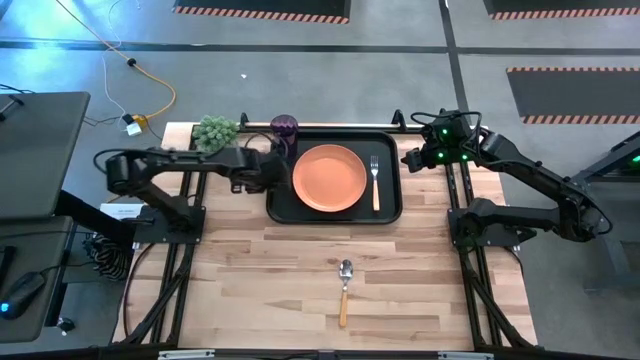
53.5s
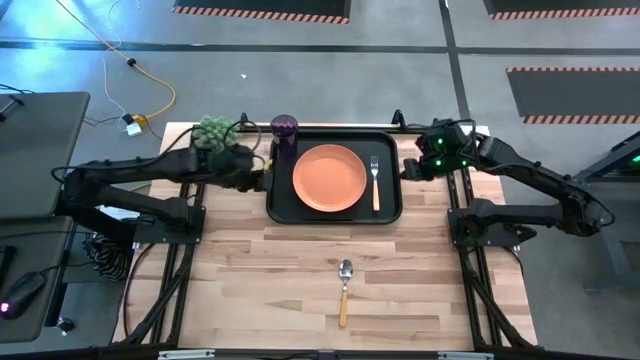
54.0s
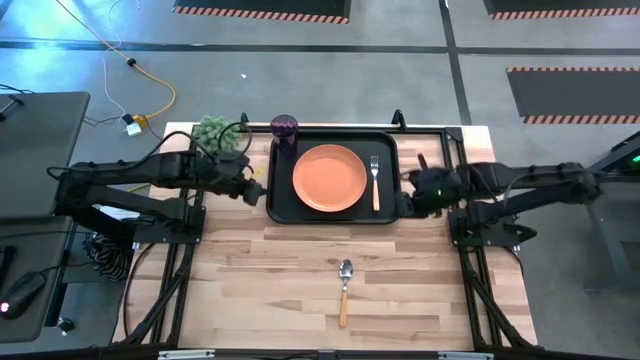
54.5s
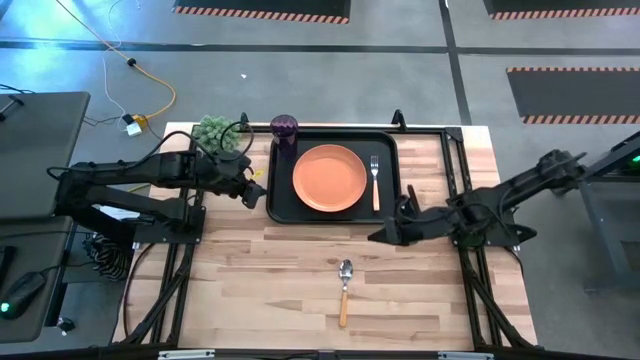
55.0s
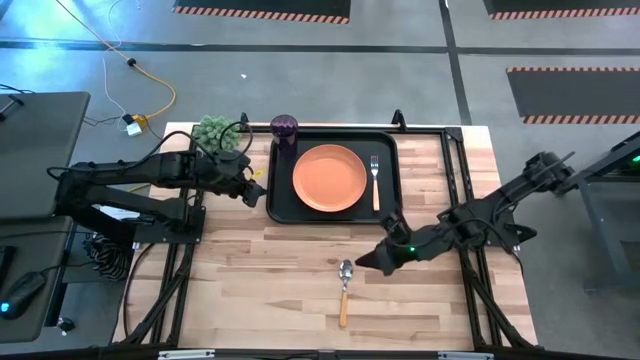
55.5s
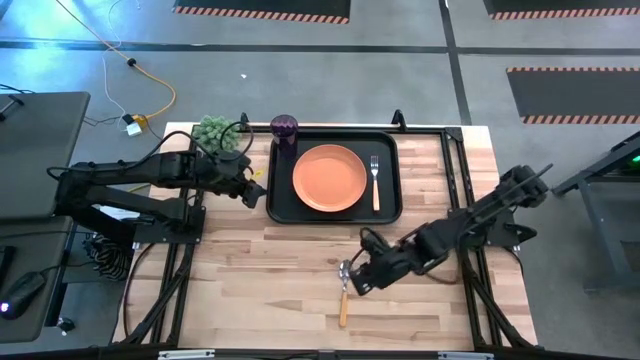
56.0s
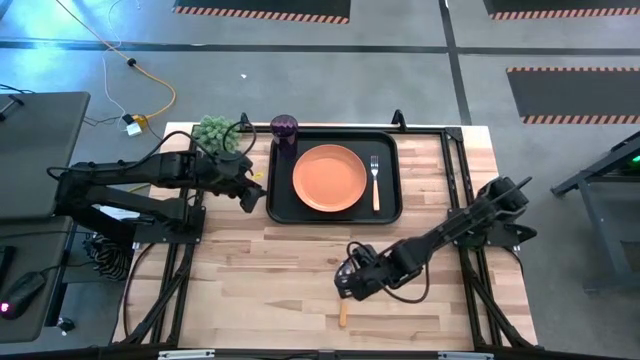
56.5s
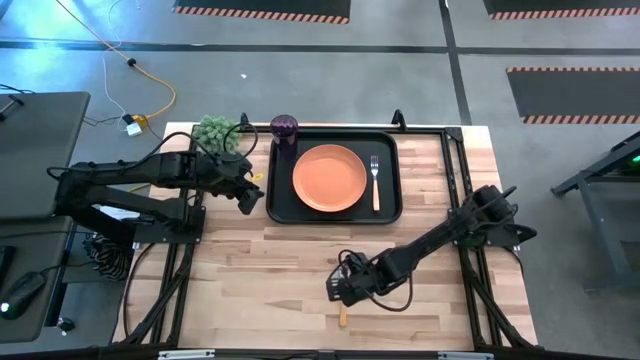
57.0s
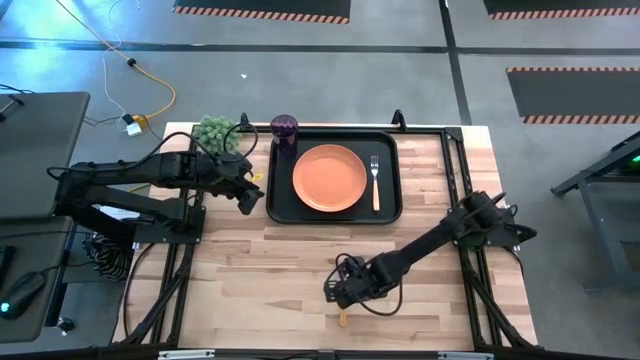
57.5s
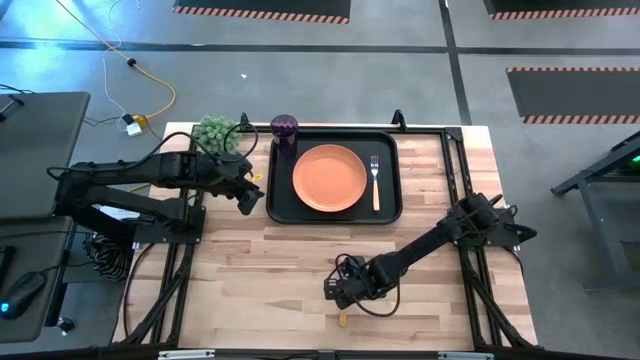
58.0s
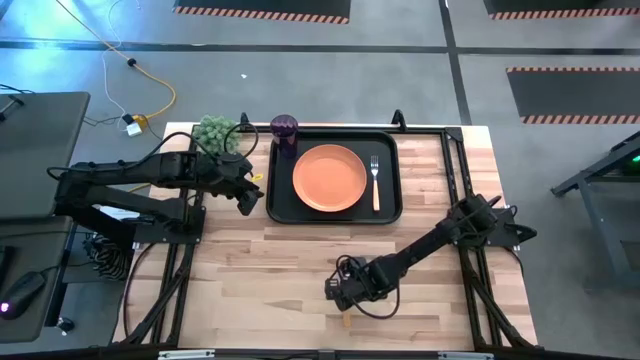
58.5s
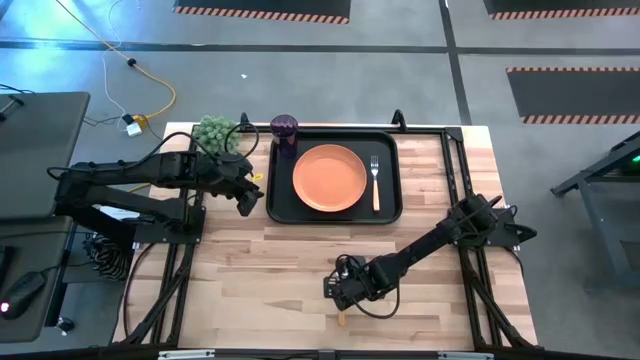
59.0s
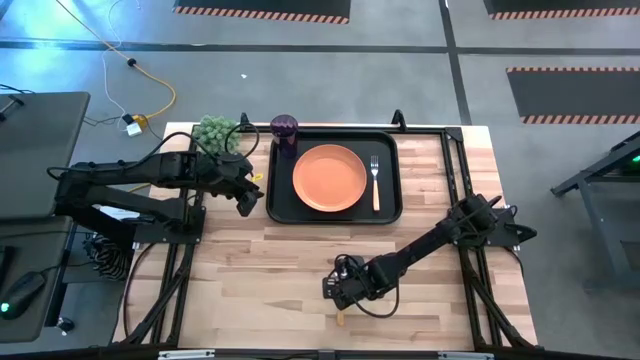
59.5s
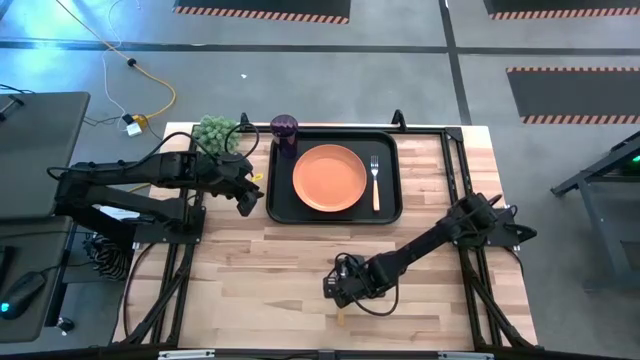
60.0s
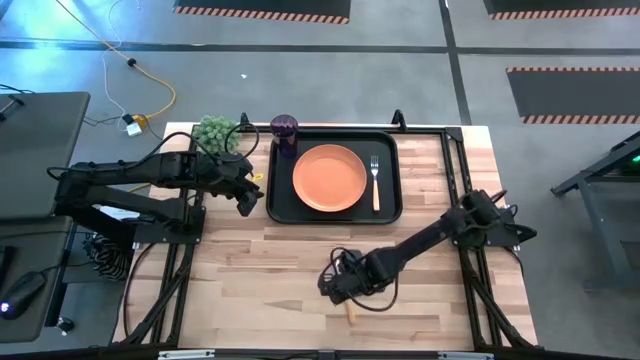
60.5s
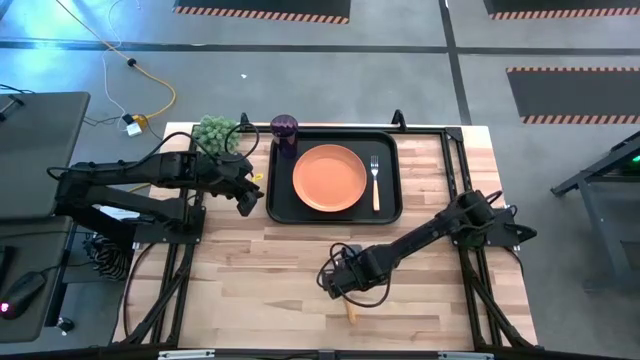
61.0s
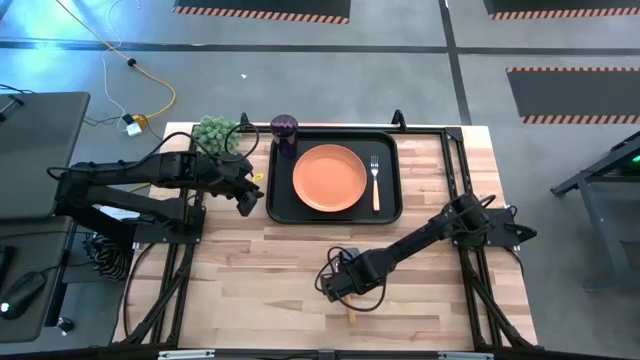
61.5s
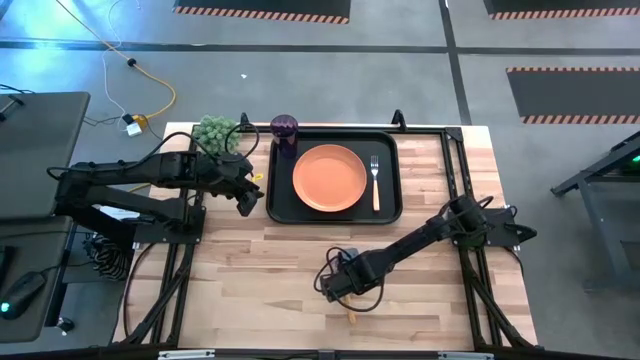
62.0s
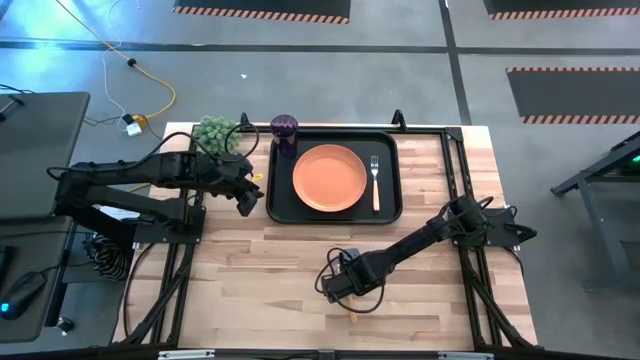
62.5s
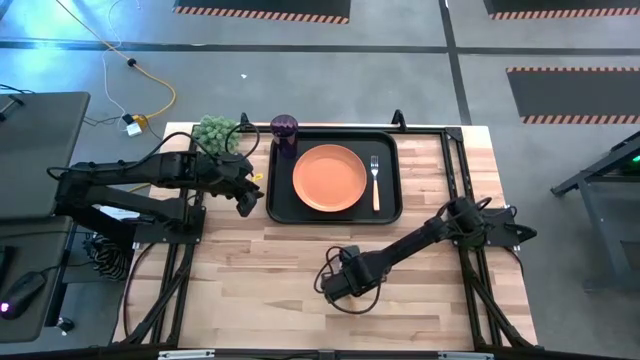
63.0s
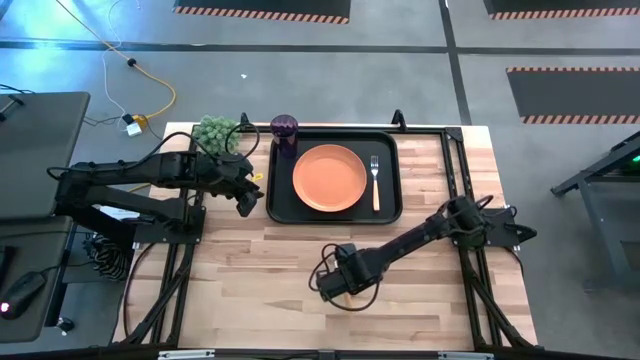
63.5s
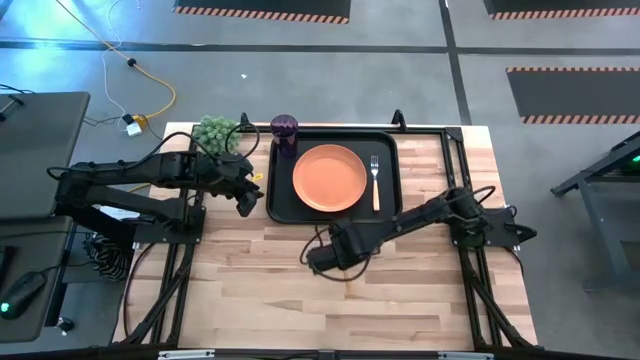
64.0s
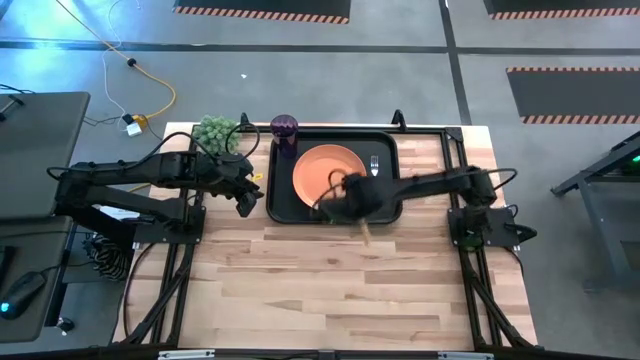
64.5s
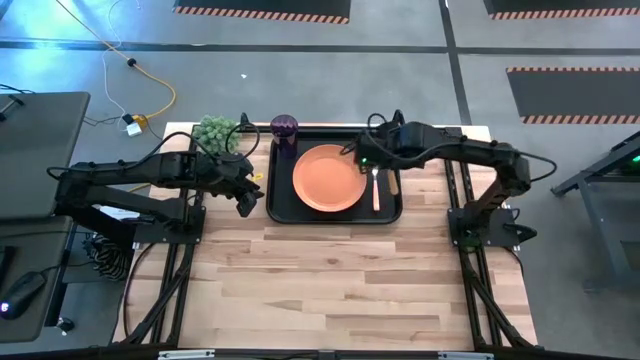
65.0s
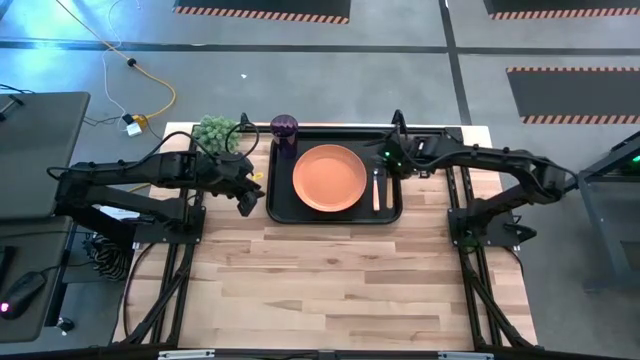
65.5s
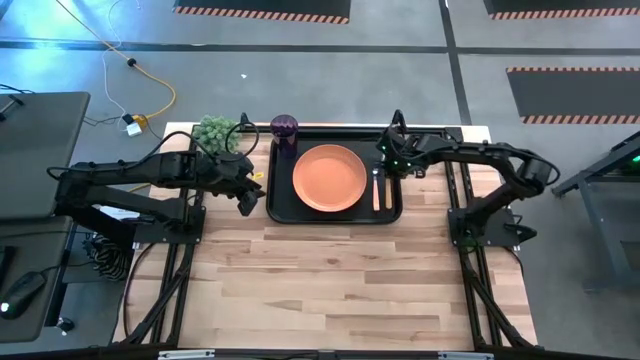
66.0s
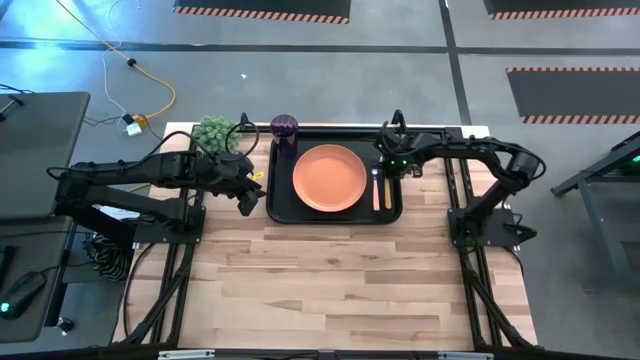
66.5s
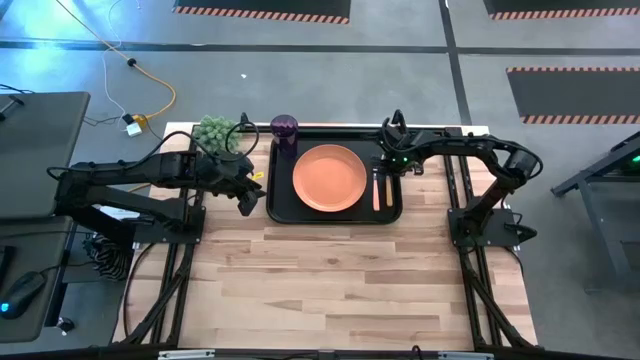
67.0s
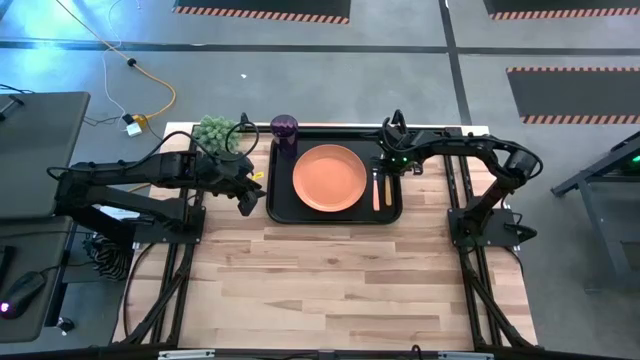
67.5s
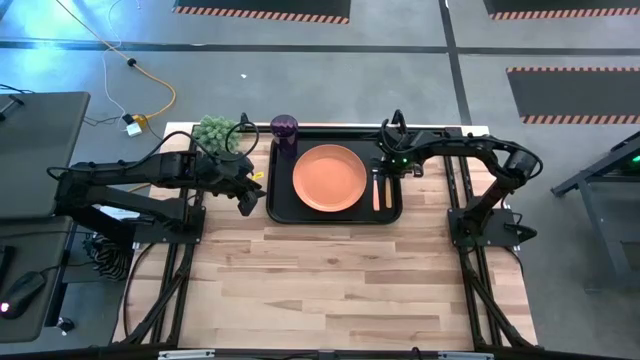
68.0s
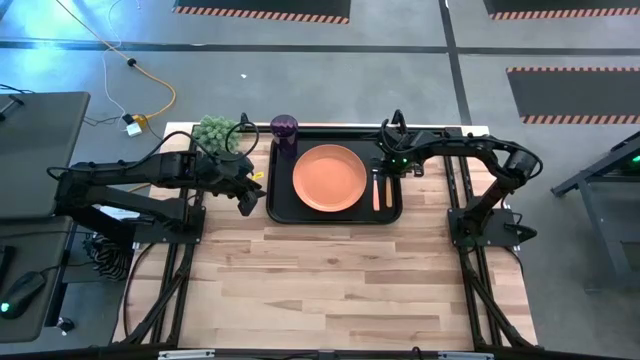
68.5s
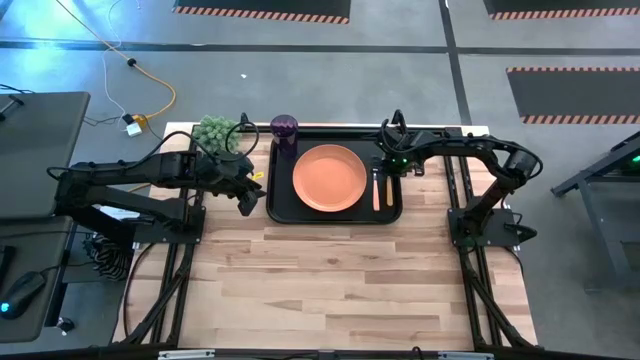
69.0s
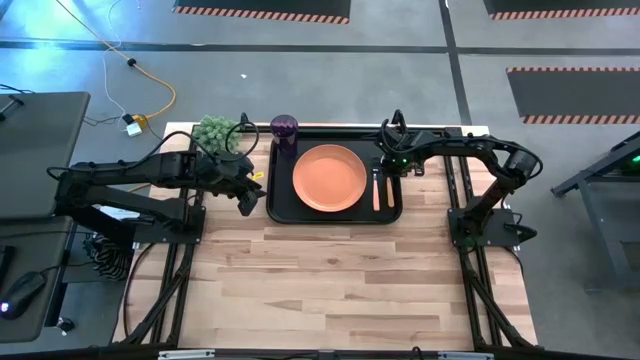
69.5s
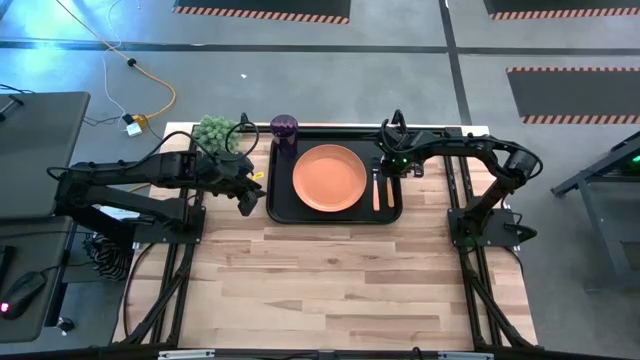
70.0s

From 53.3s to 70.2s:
Task: Pick and place plate/cup/fork/spoon on tray
Put the orange spoon to the right side of the orange fork on the black serving tray

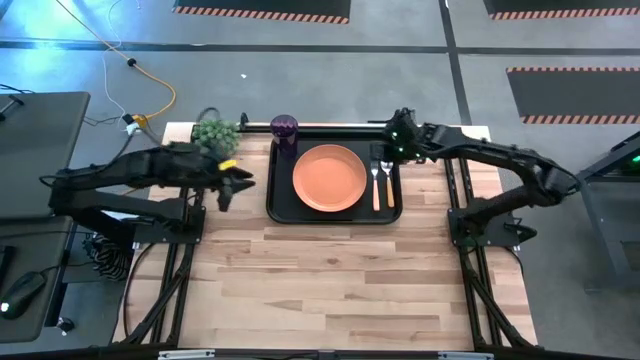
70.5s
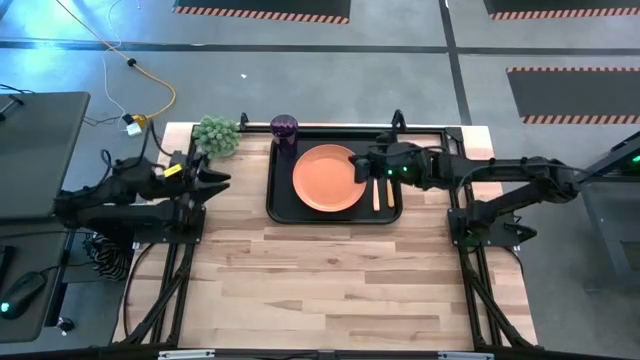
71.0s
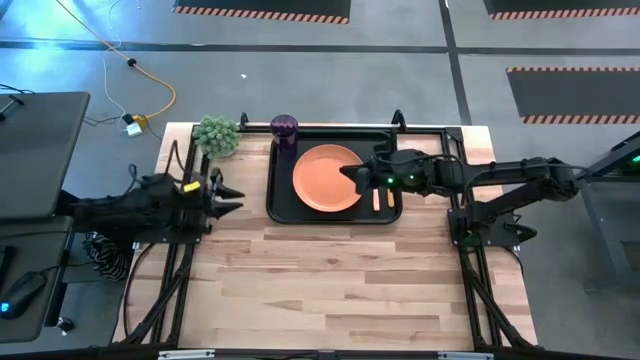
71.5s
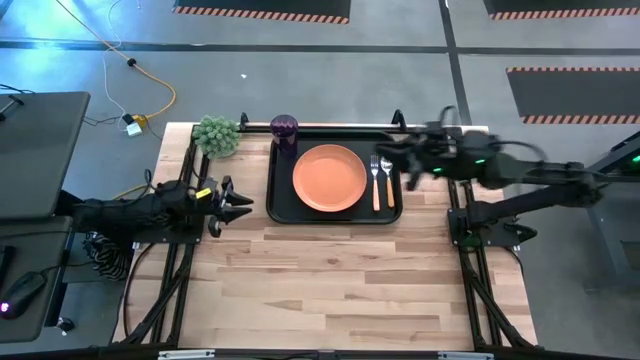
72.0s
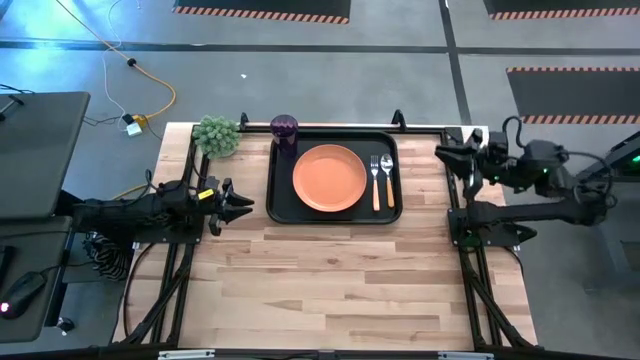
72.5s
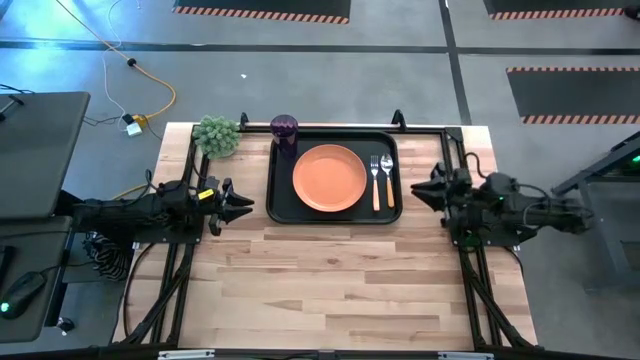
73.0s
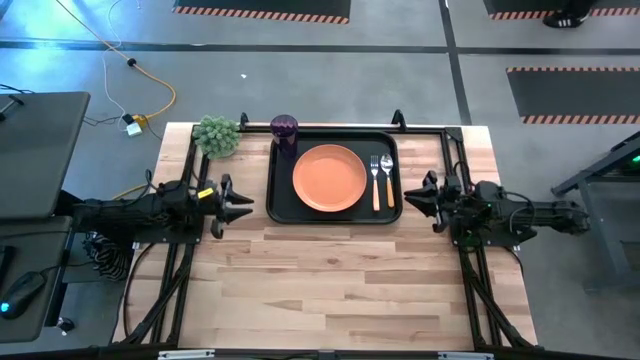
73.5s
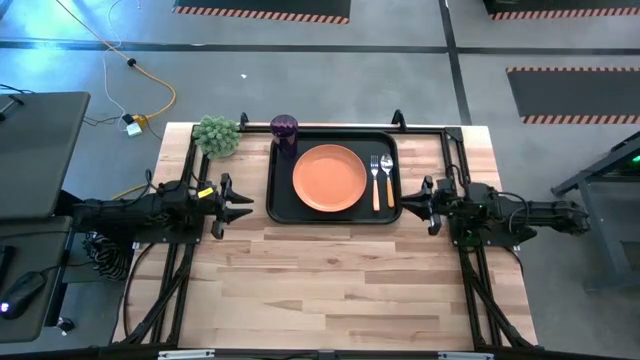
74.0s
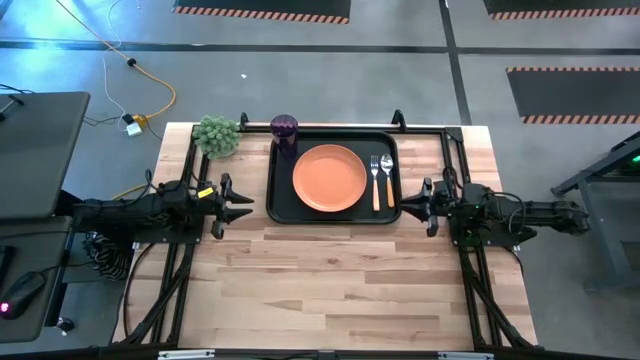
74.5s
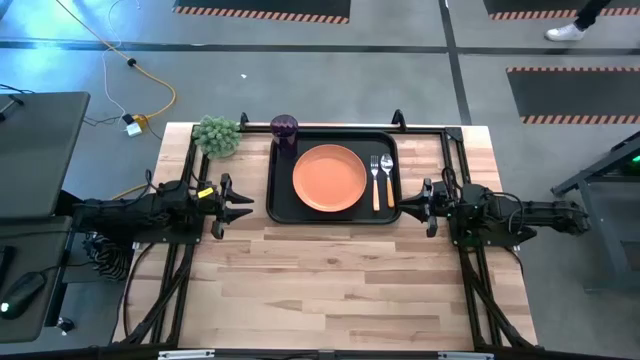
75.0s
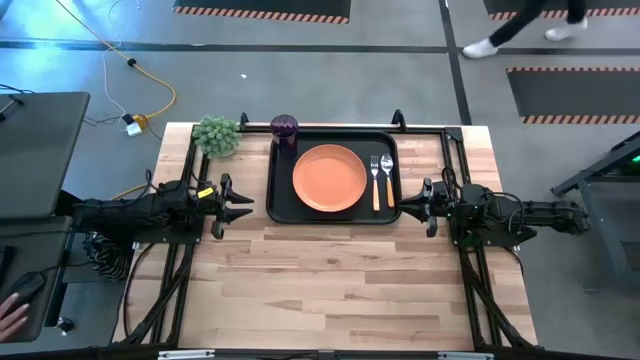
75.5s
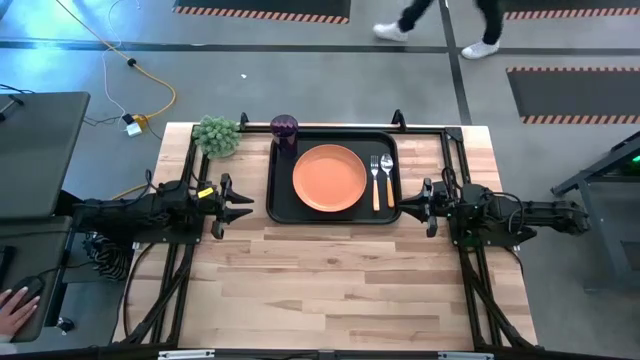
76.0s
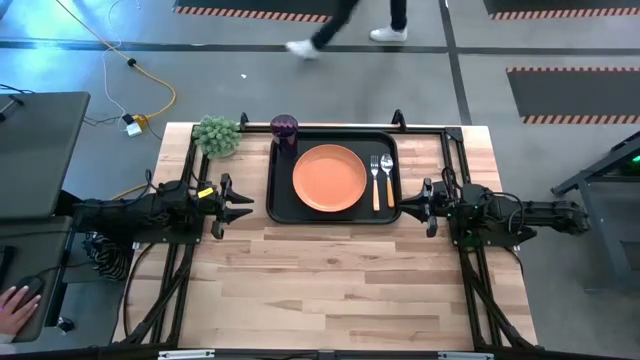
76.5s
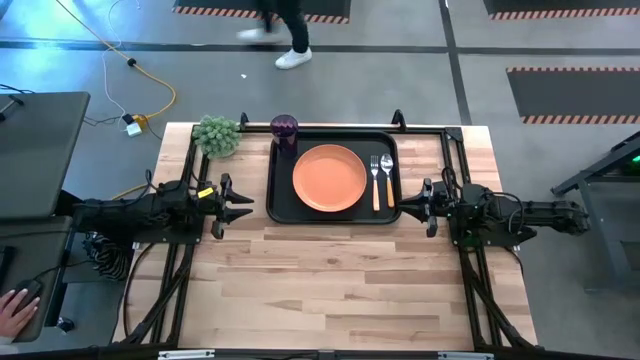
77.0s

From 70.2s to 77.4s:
Return to Home Position
